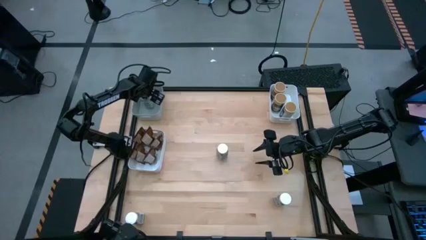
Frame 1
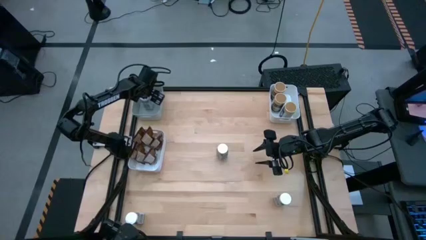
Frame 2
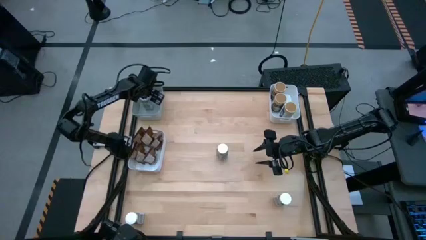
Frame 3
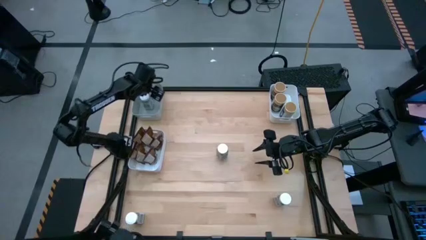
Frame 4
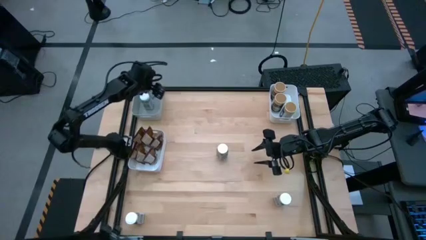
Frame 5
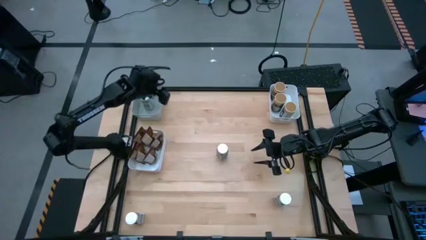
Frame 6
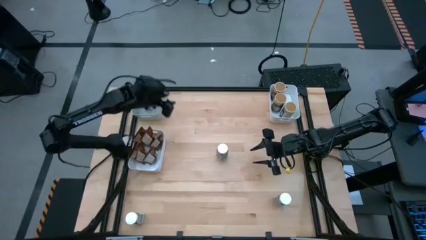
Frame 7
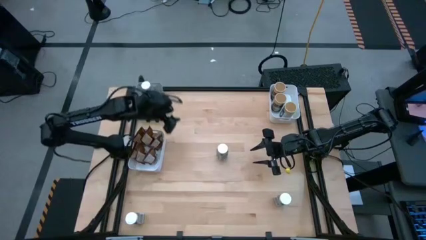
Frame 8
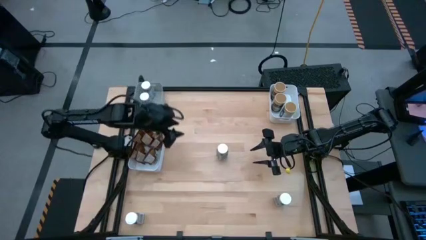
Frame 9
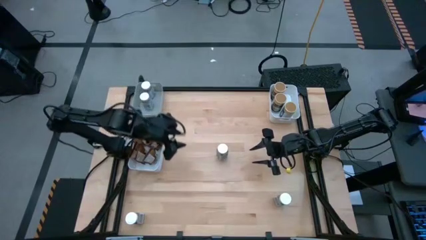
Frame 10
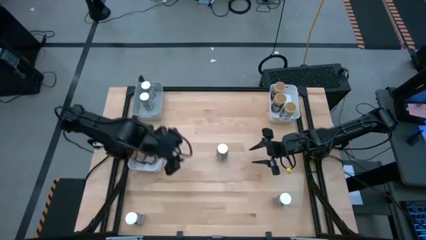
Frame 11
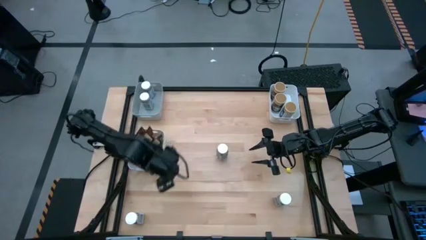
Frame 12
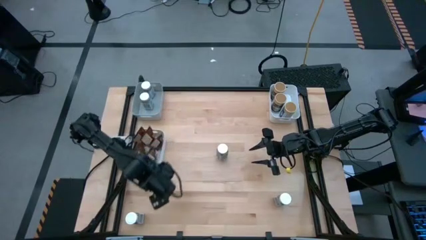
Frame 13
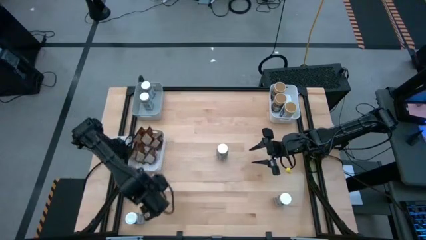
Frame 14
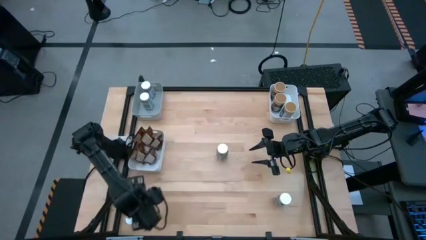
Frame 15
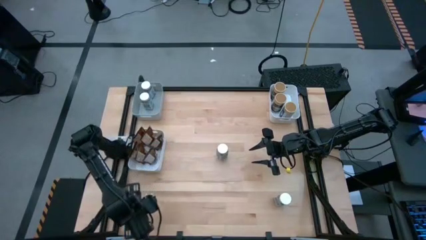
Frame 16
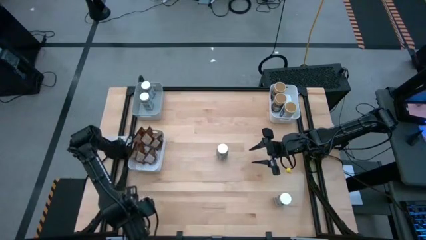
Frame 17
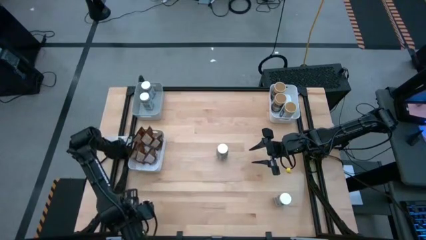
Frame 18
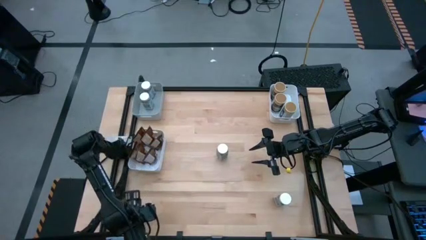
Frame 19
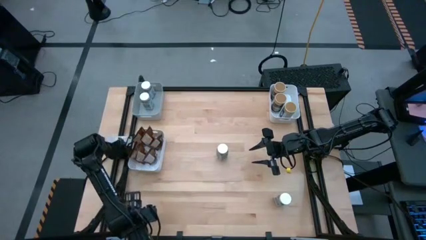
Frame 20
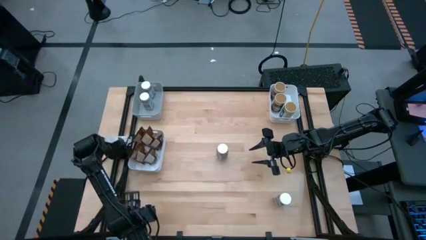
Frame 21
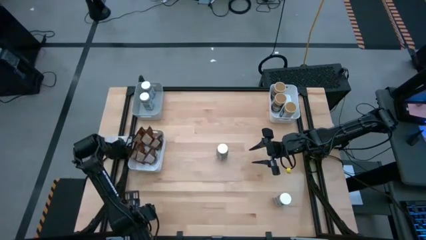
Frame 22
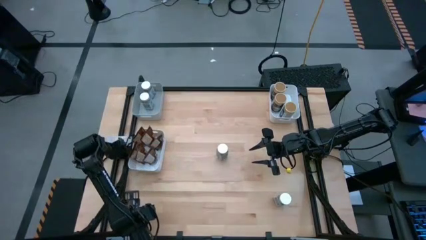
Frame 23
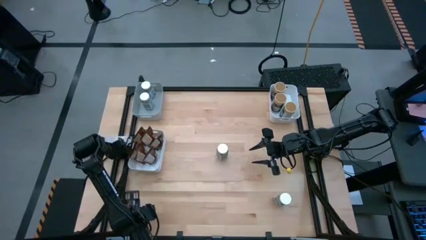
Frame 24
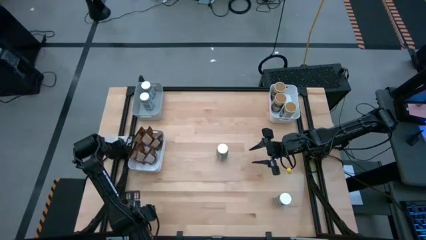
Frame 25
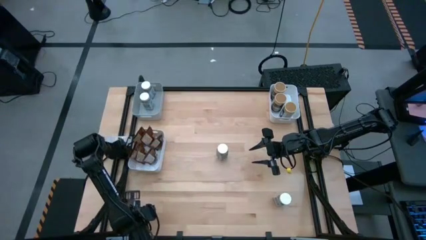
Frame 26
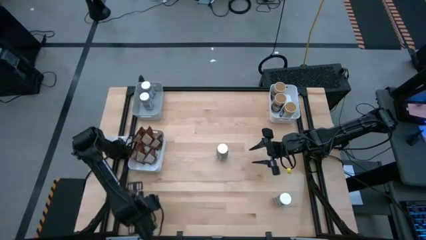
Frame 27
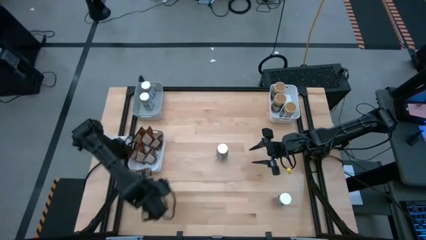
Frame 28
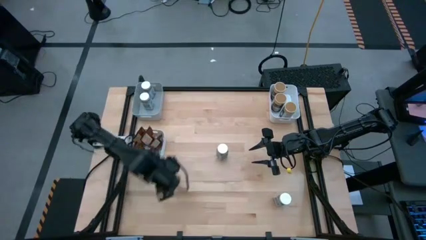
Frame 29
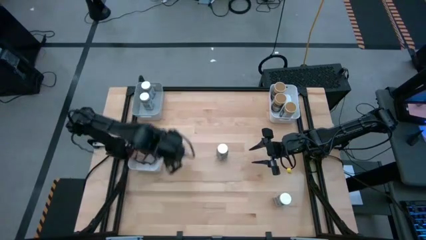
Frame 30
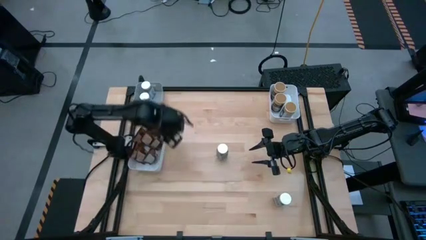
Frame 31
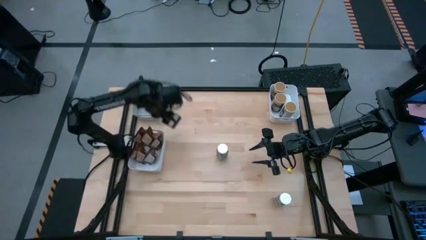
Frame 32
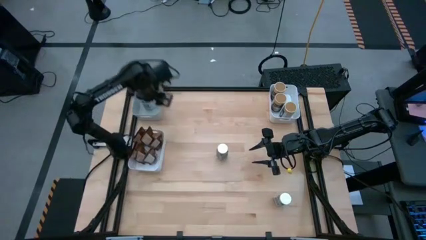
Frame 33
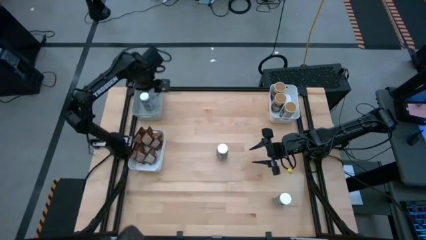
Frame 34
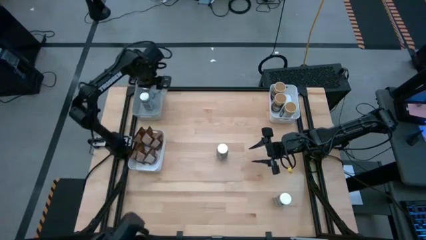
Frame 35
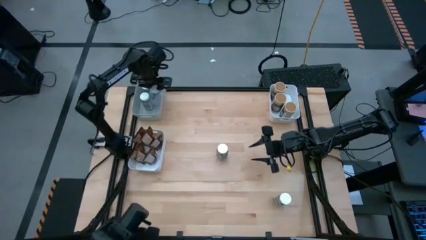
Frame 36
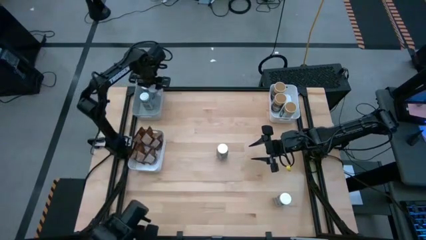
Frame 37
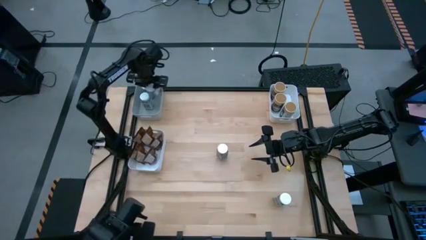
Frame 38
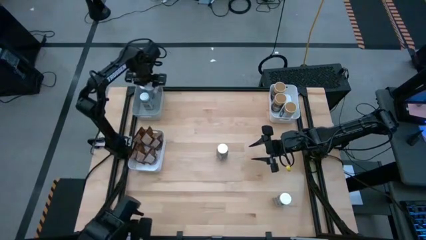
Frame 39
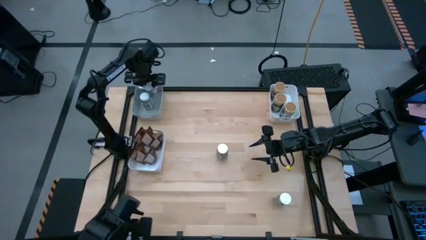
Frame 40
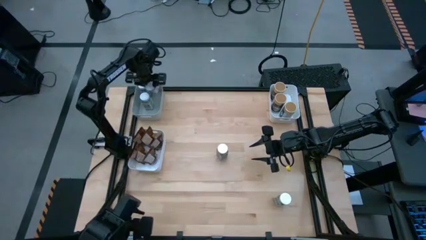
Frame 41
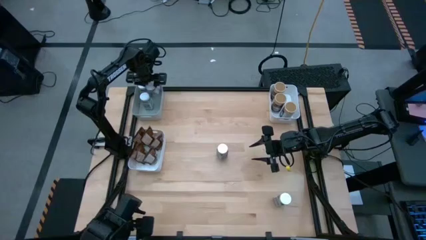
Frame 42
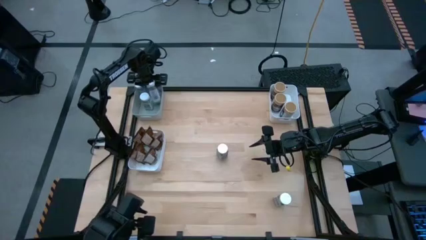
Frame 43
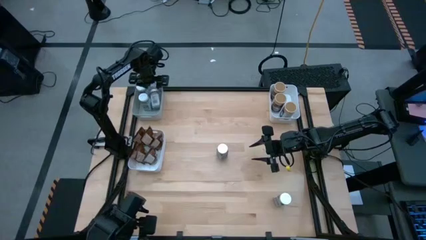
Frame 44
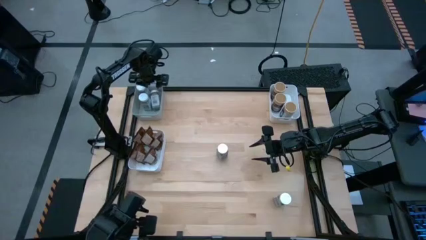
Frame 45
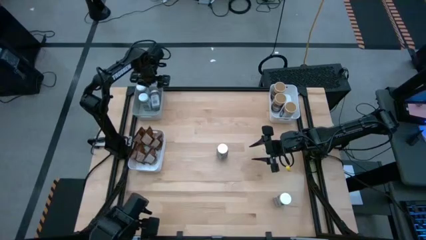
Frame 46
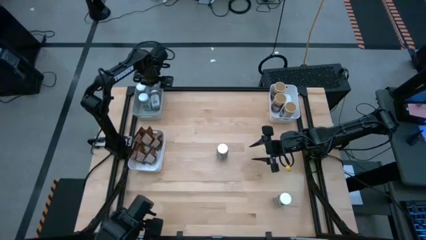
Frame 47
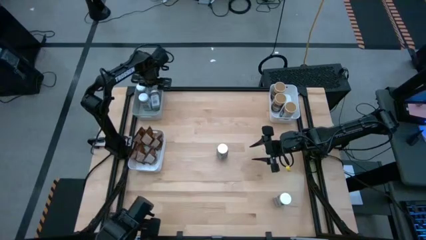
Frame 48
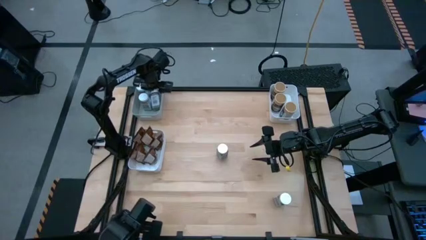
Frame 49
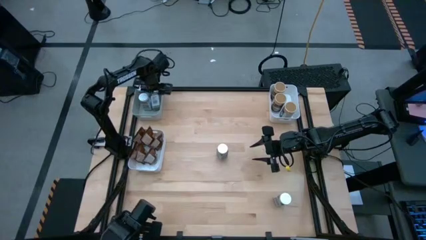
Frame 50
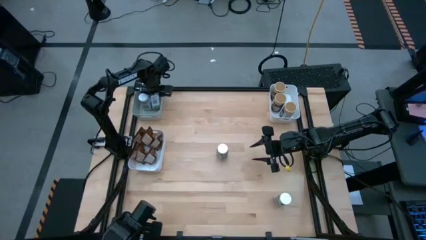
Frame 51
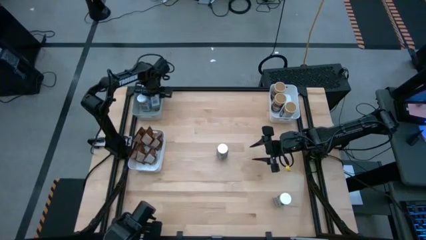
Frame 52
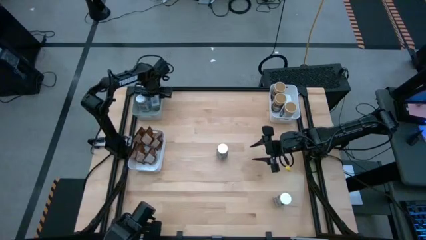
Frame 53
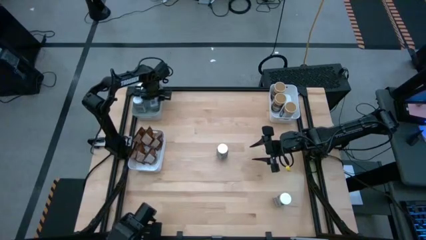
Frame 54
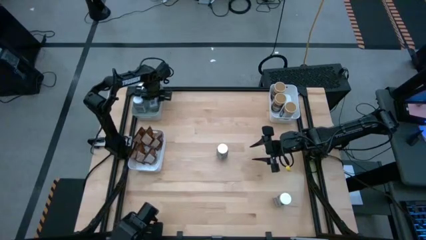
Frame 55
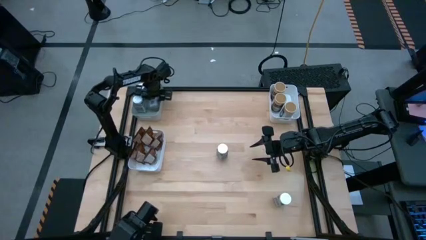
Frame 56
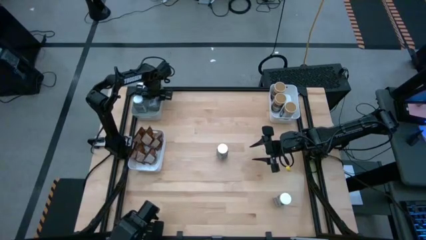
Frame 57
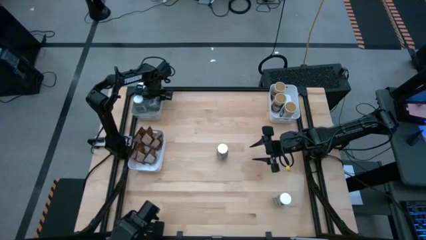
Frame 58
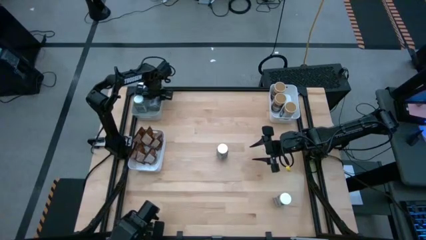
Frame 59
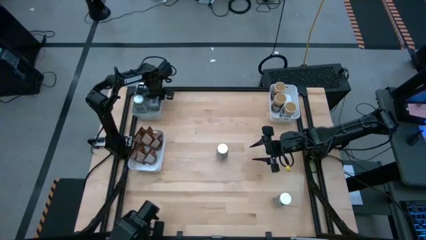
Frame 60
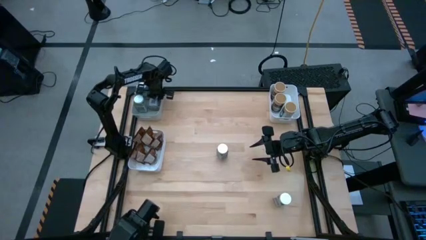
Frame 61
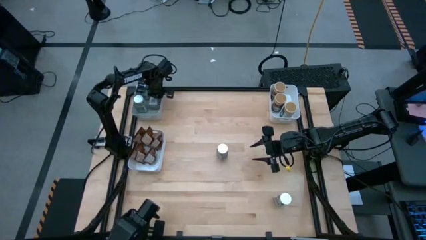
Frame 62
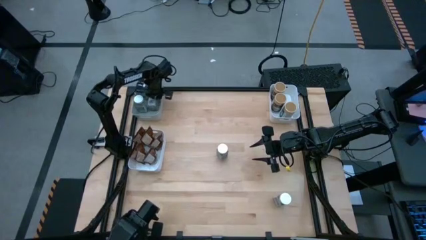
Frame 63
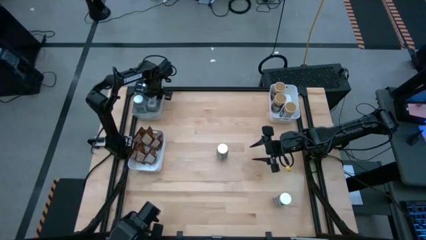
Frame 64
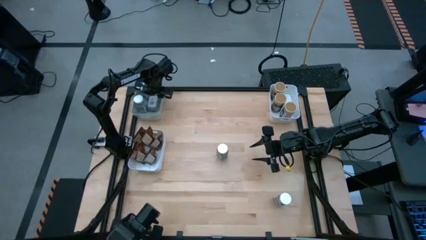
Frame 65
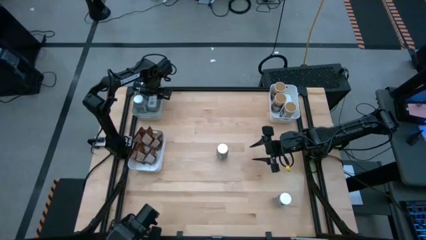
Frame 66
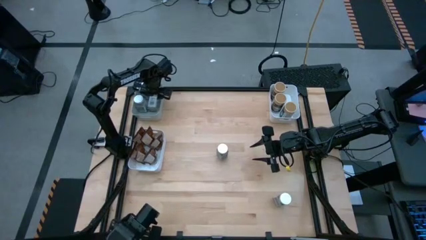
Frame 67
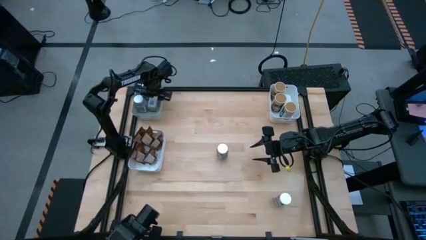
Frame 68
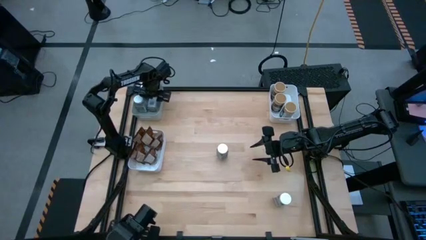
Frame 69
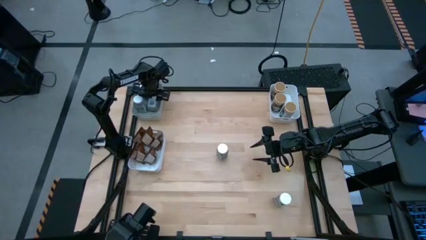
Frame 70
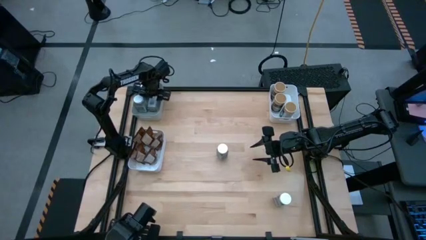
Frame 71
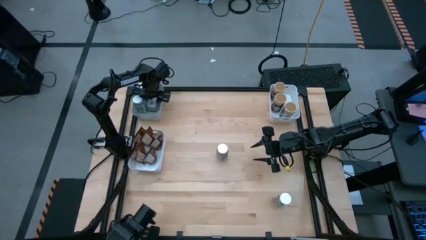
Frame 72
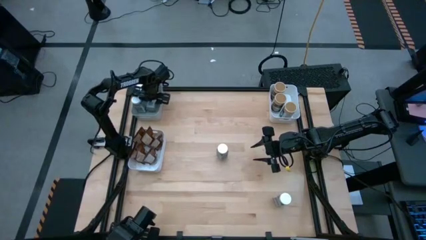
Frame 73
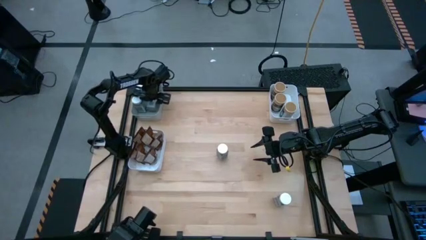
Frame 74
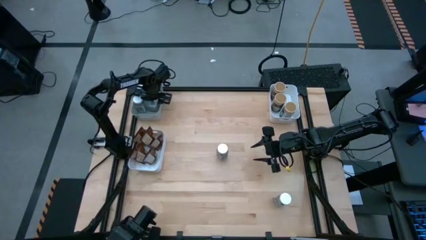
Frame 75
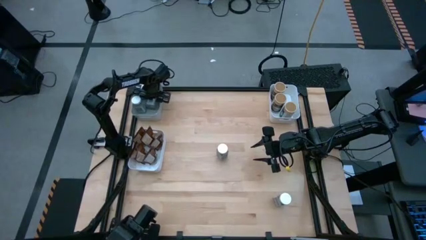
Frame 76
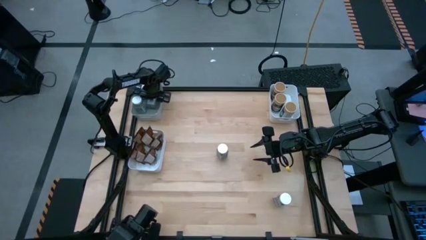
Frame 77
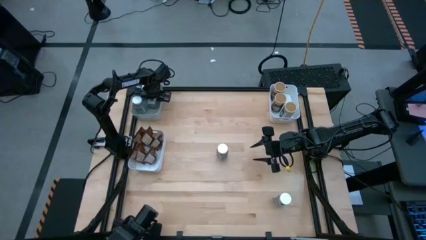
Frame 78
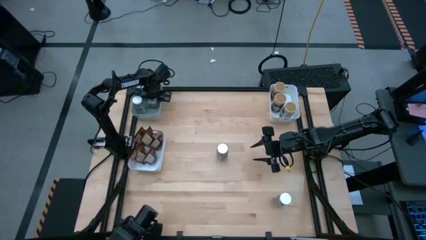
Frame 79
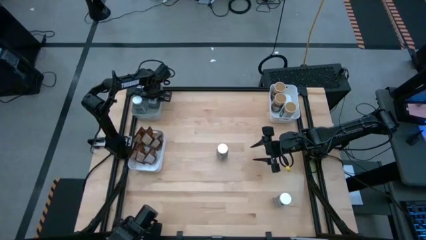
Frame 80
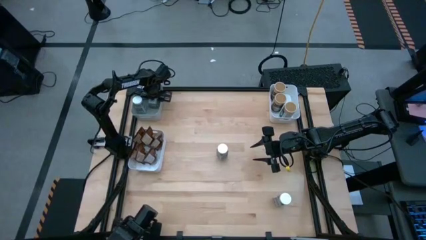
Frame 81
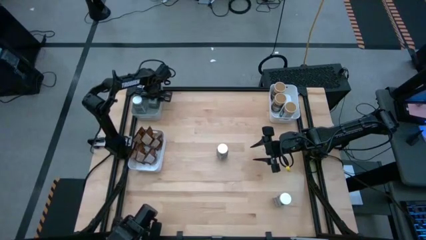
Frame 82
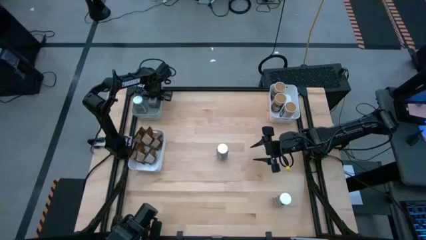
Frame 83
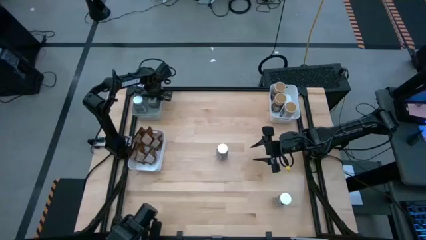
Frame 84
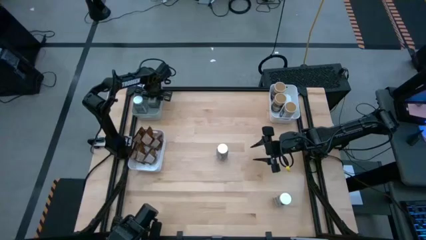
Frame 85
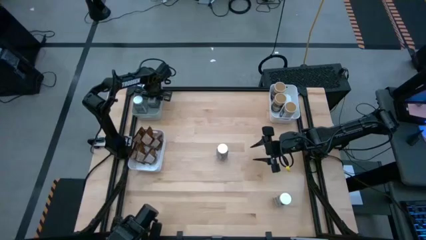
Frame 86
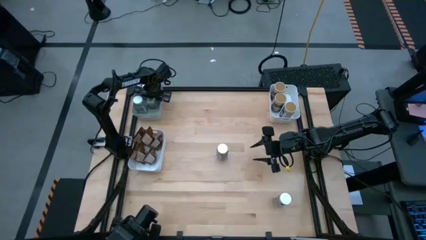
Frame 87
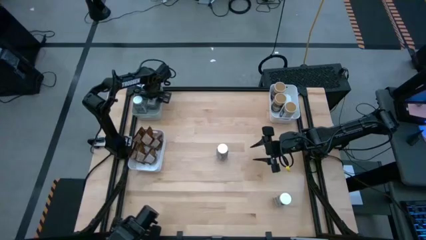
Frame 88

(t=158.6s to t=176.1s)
Task: Sort spices by type
Put the white seasoning bottle into the gray bin
